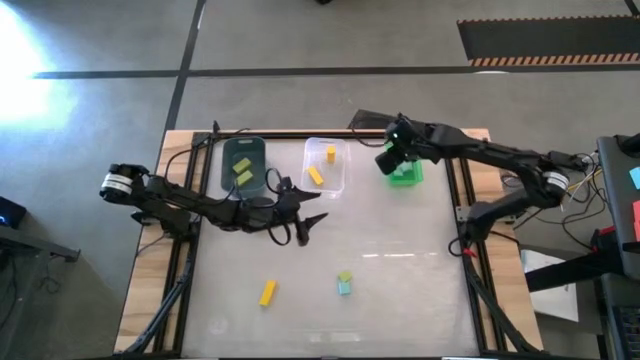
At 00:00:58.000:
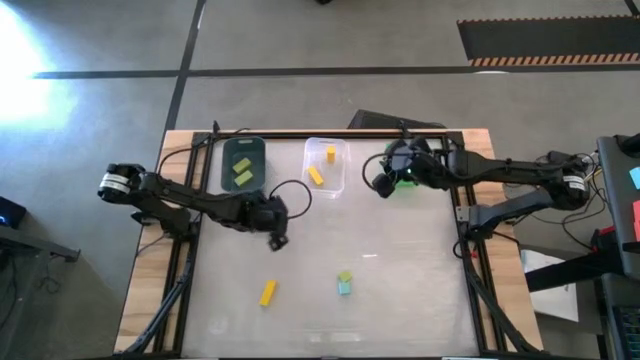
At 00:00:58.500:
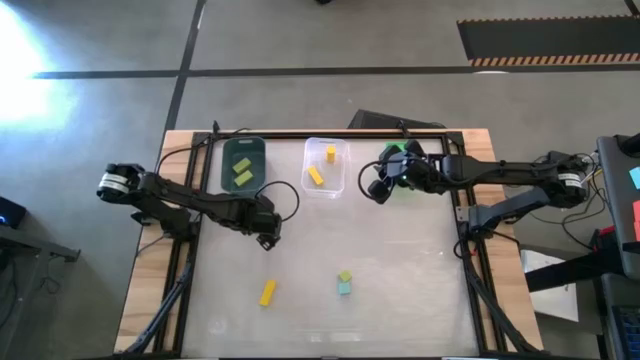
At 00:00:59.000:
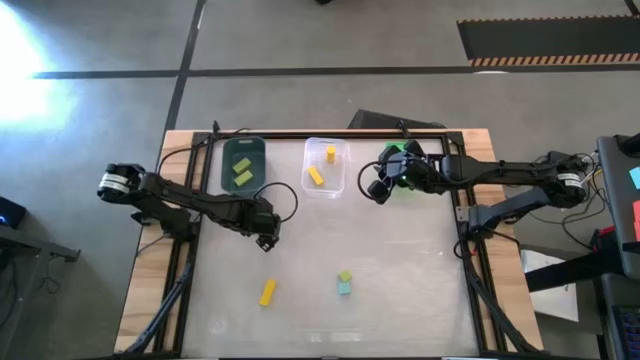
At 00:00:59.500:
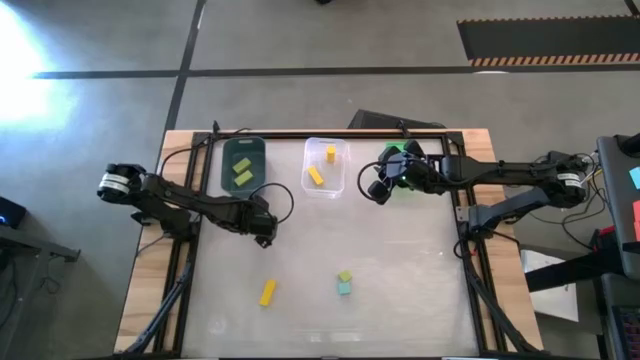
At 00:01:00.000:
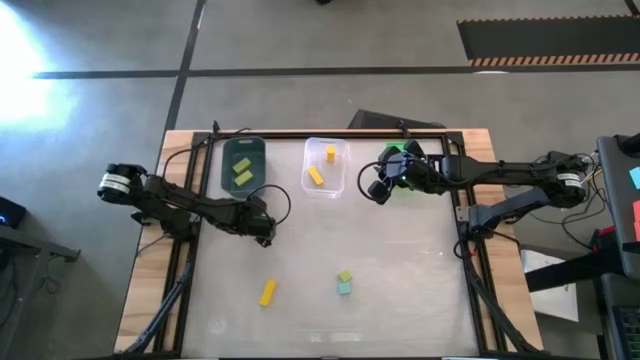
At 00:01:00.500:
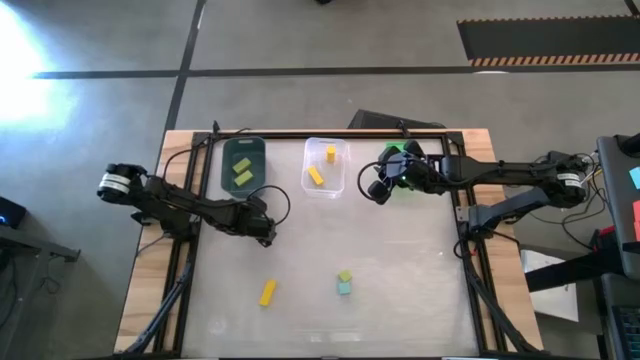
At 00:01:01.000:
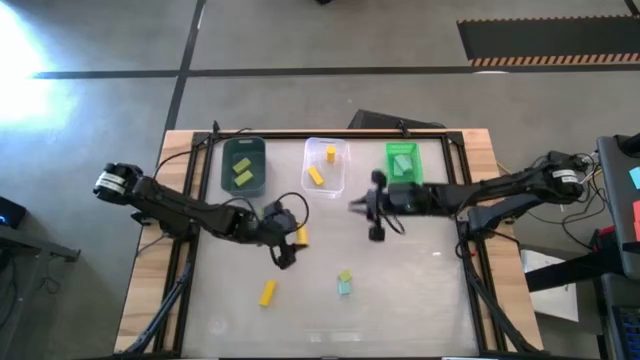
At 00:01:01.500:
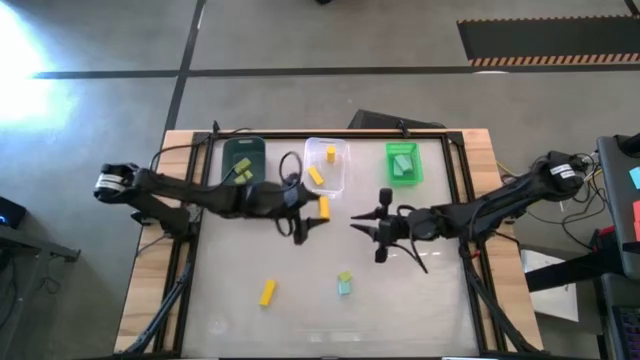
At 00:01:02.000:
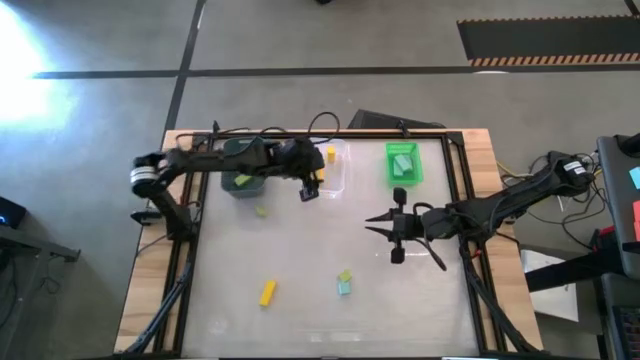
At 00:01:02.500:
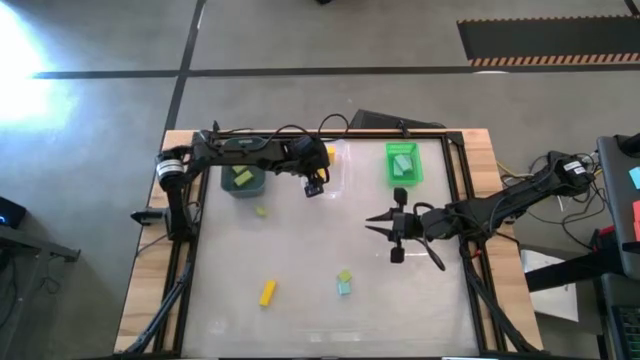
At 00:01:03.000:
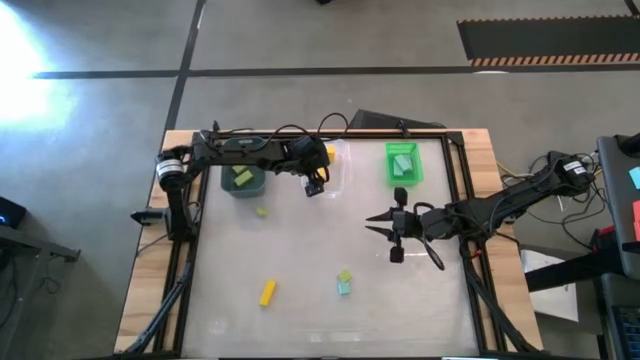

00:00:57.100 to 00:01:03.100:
Task: Sort & place blocks by color
Put the yellow block into the transparent bin

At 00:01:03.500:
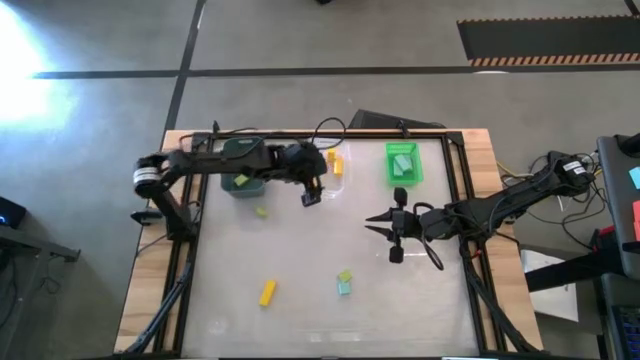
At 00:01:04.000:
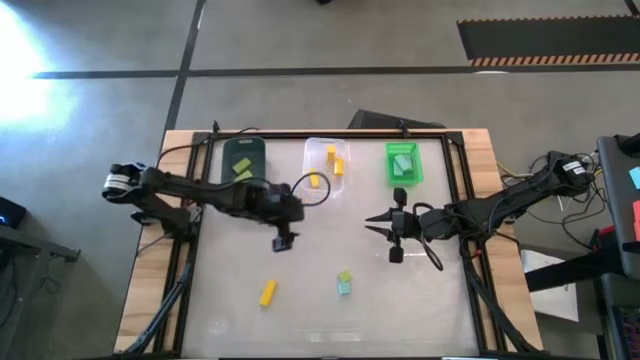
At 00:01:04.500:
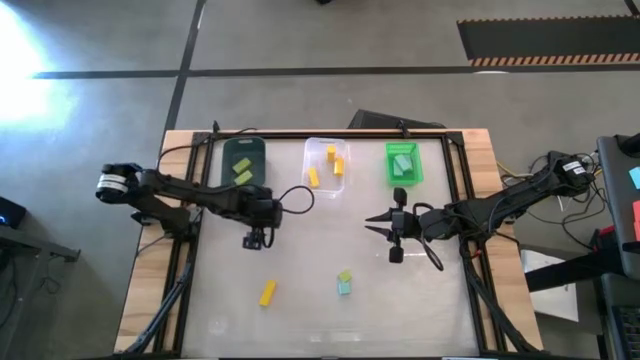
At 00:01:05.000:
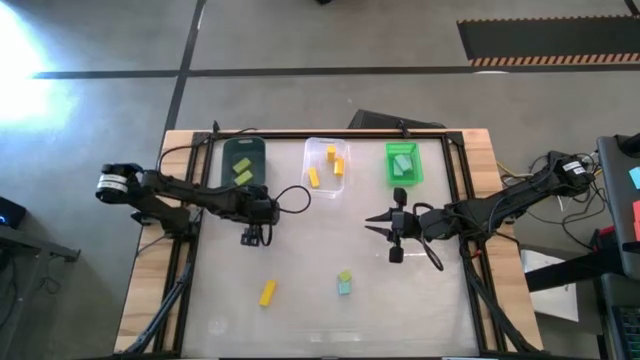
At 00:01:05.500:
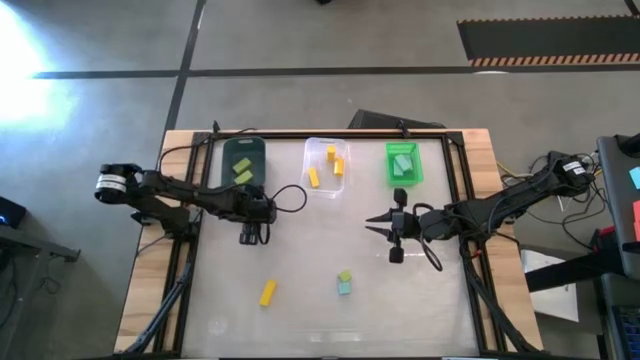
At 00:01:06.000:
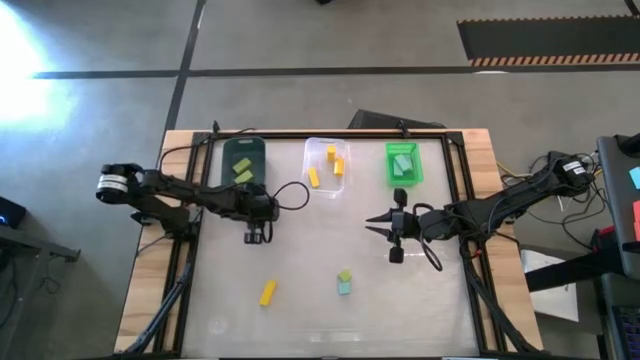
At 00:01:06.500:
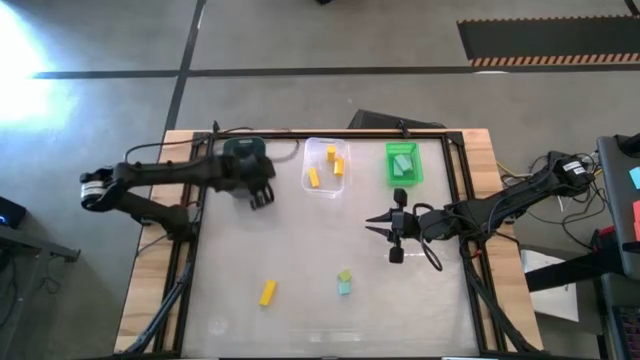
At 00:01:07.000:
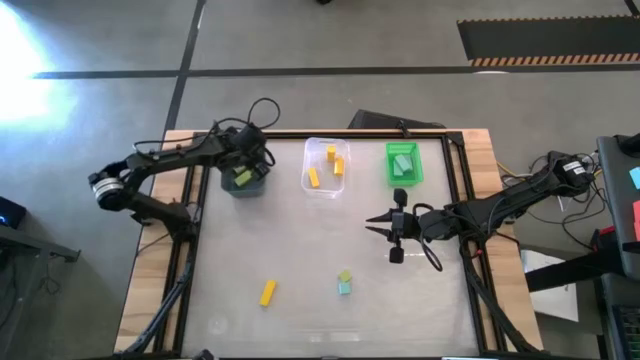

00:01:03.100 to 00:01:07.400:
Put the green block into the blue bin

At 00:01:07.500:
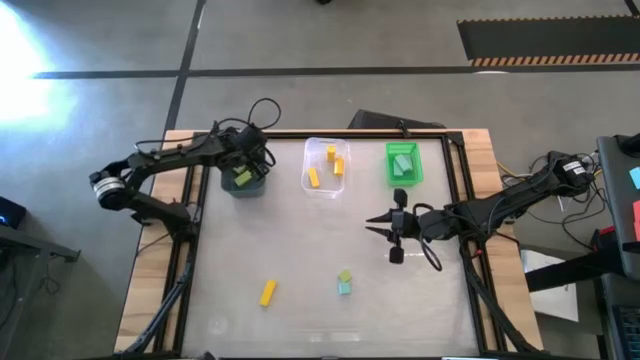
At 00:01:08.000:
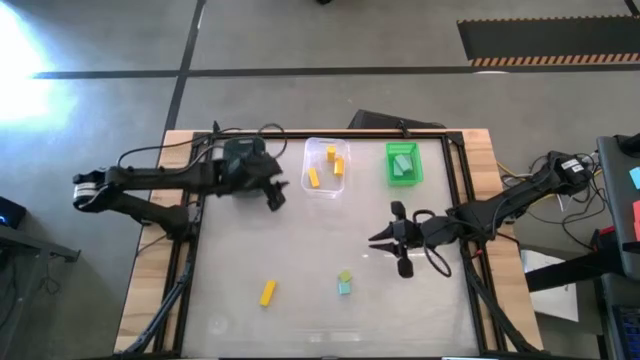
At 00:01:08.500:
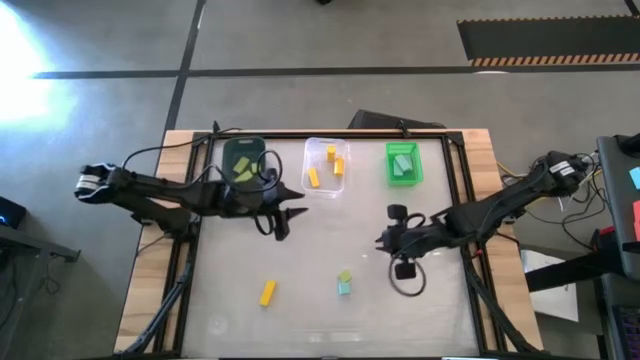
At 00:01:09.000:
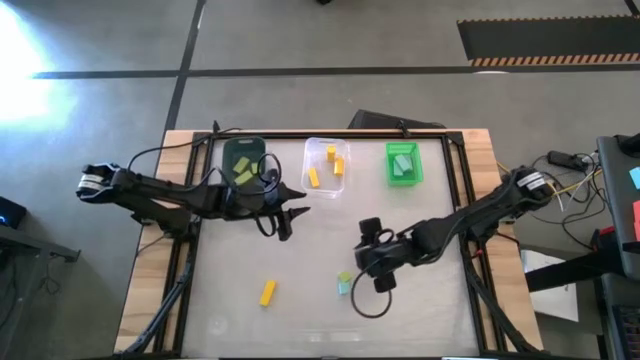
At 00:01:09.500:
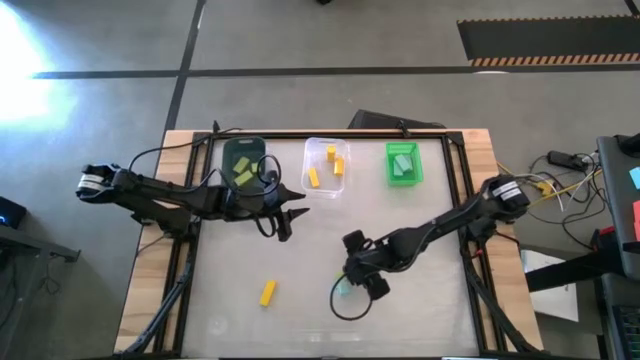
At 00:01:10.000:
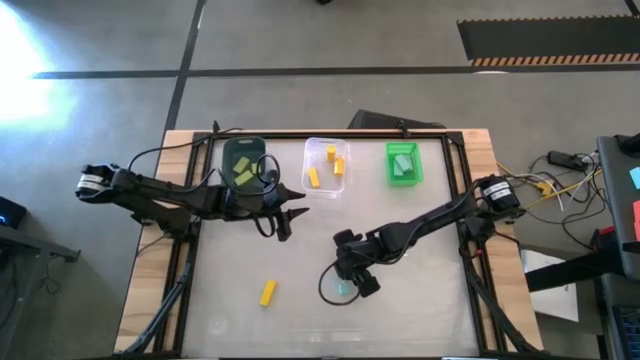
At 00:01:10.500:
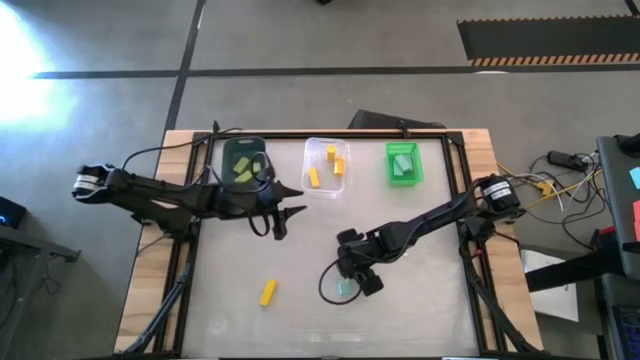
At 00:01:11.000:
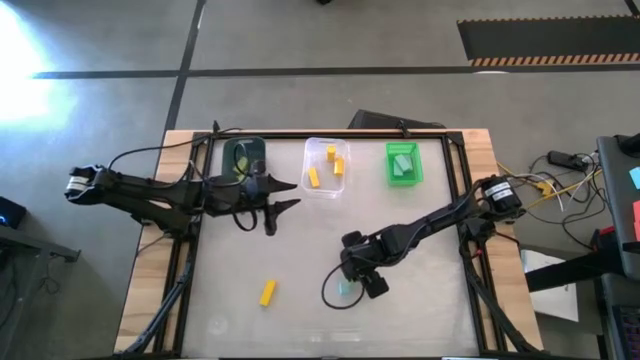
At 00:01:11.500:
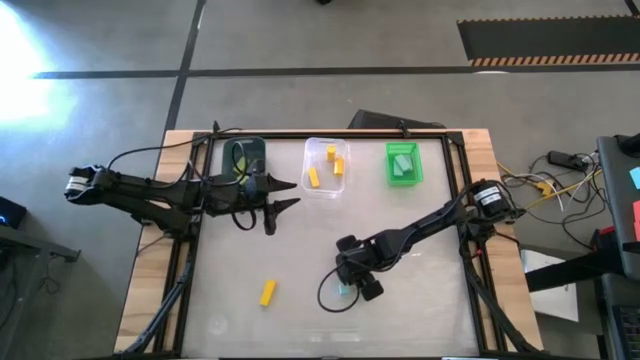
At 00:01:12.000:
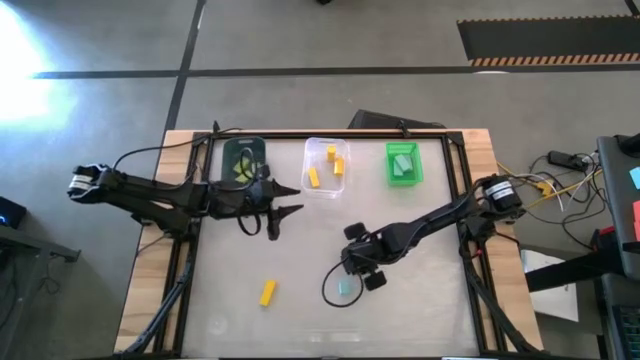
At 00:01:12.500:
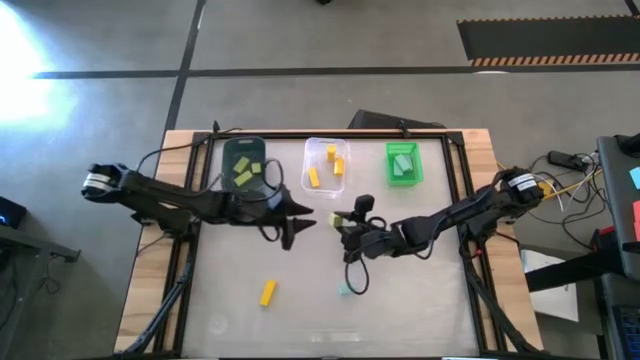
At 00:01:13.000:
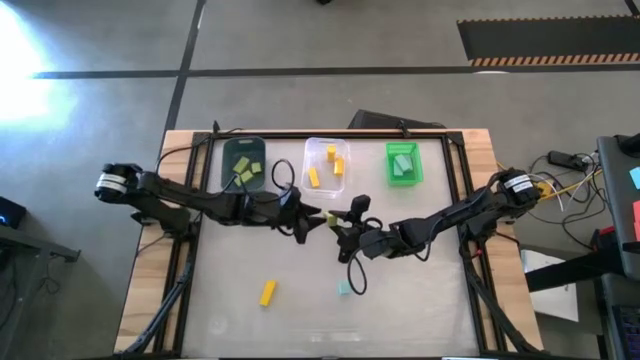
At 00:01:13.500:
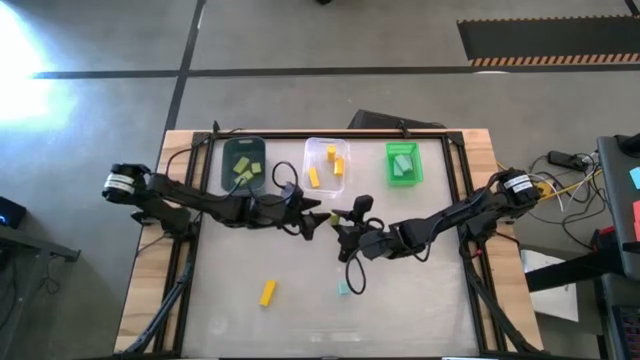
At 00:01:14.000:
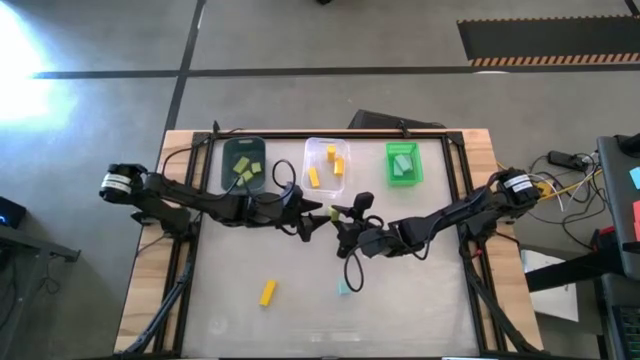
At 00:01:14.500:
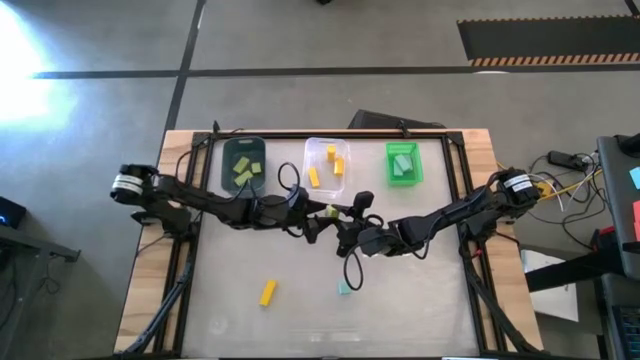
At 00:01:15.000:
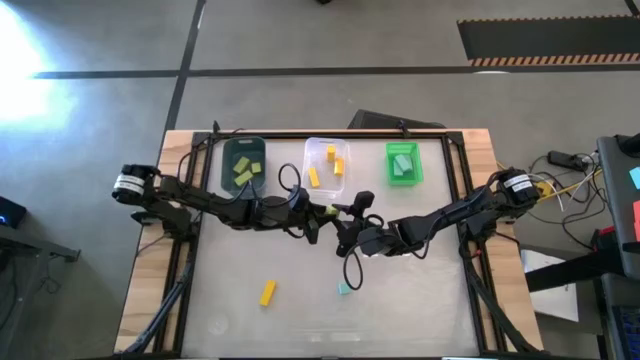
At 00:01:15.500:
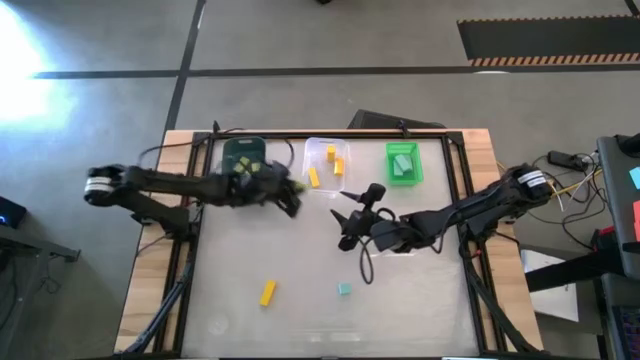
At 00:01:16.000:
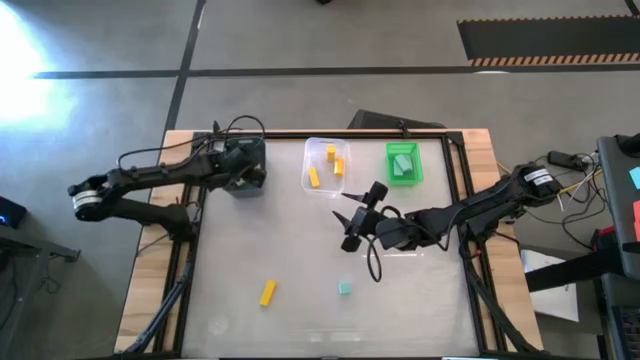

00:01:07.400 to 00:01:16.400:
Put the green block into the blue bin
